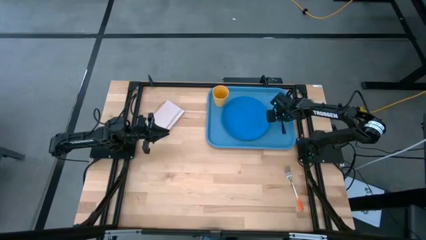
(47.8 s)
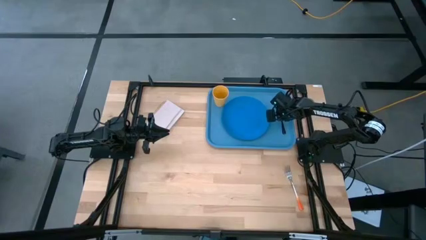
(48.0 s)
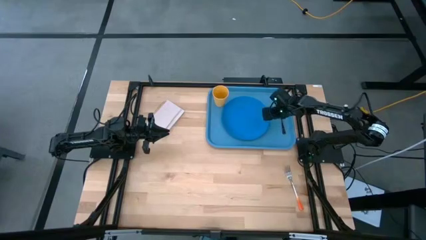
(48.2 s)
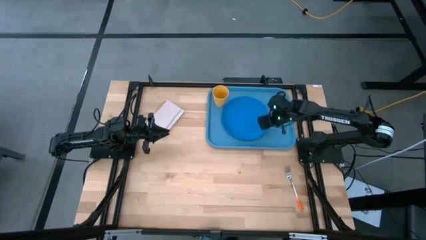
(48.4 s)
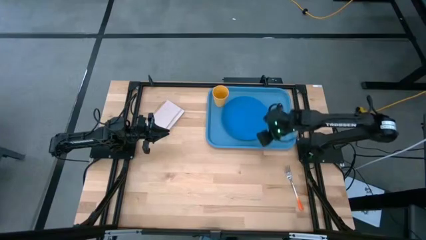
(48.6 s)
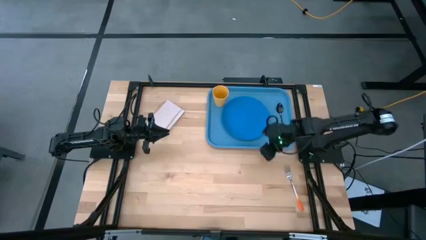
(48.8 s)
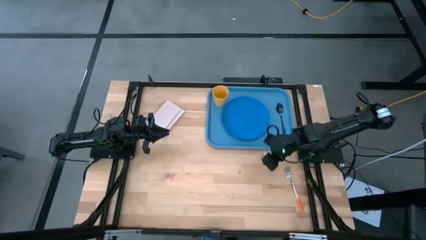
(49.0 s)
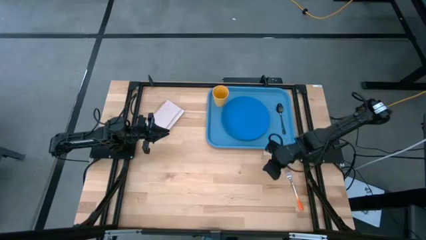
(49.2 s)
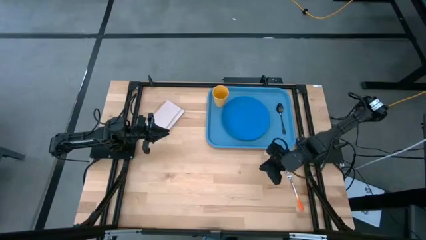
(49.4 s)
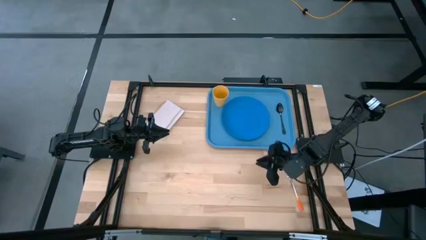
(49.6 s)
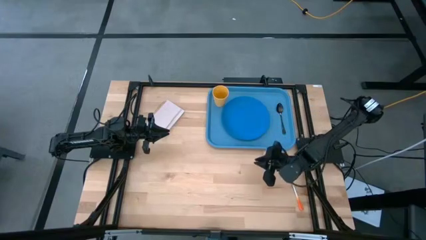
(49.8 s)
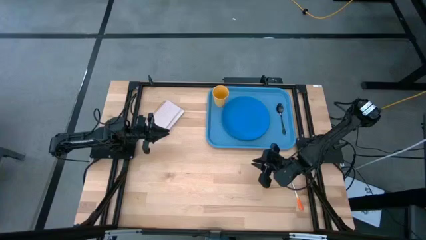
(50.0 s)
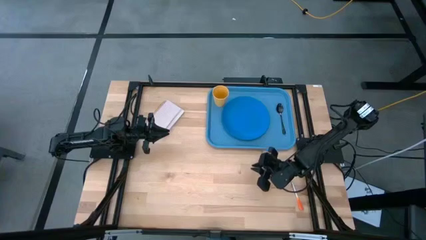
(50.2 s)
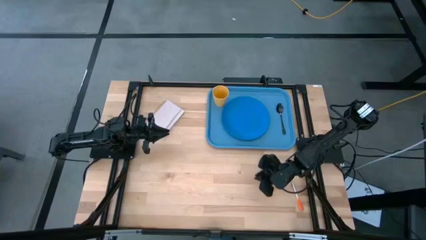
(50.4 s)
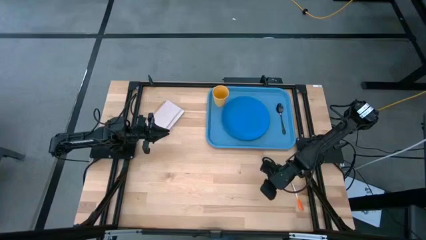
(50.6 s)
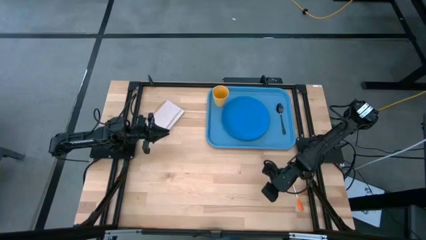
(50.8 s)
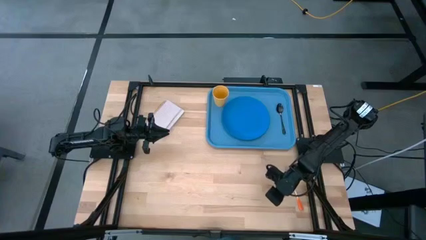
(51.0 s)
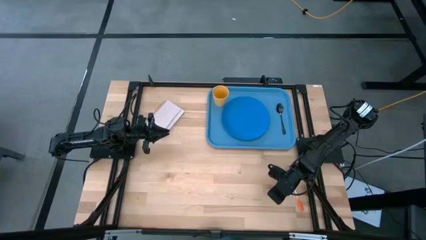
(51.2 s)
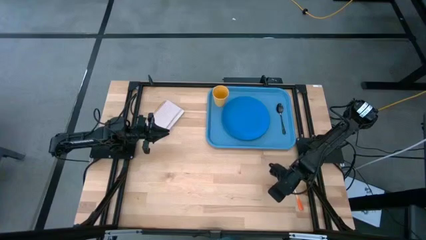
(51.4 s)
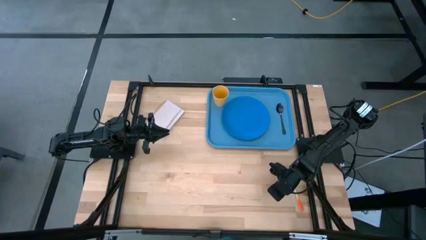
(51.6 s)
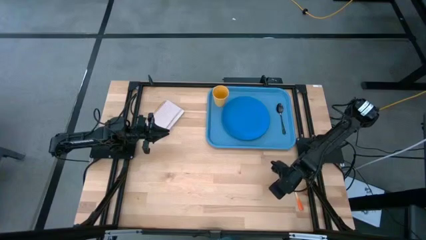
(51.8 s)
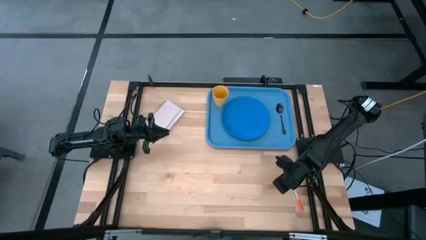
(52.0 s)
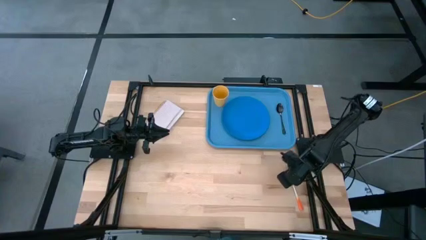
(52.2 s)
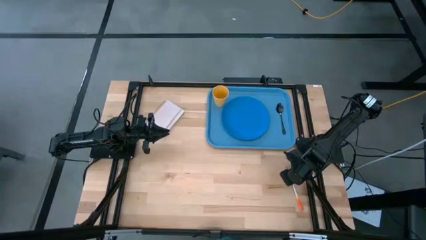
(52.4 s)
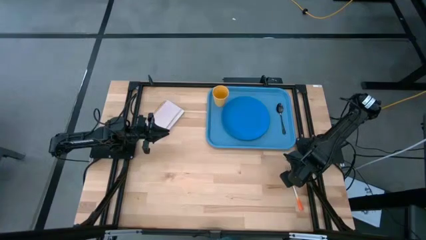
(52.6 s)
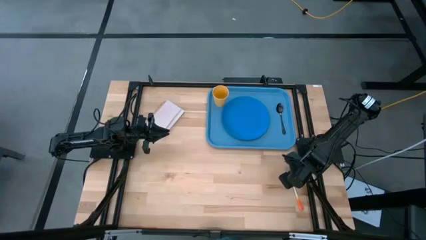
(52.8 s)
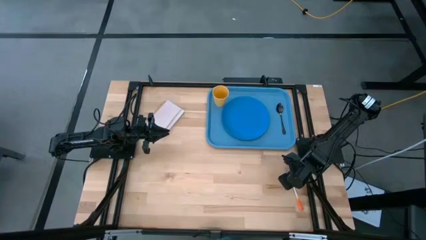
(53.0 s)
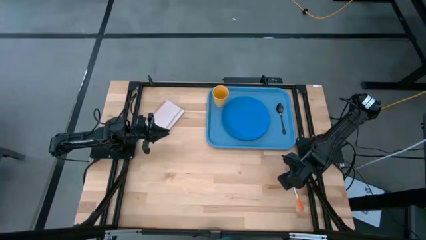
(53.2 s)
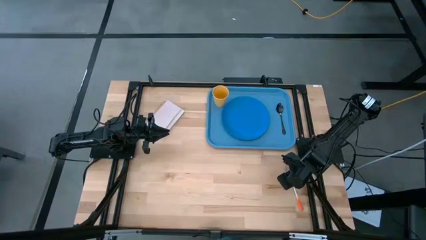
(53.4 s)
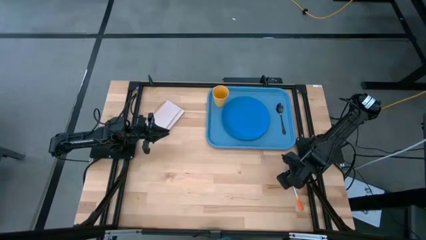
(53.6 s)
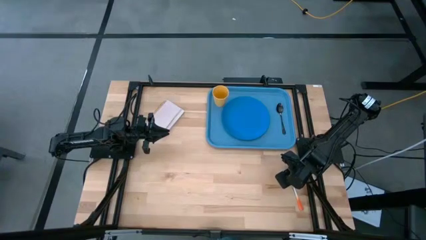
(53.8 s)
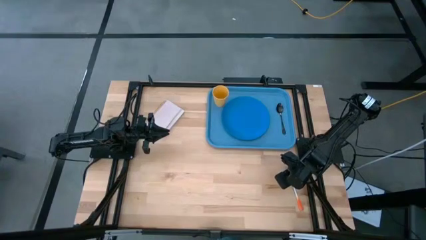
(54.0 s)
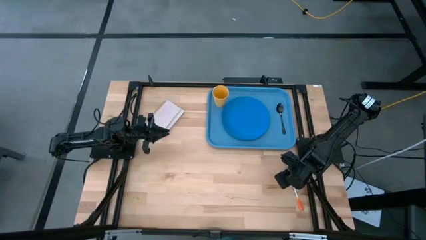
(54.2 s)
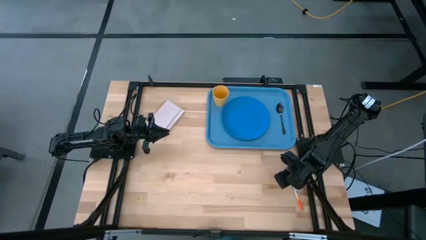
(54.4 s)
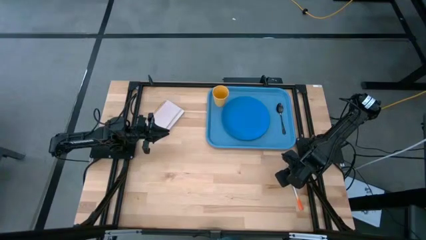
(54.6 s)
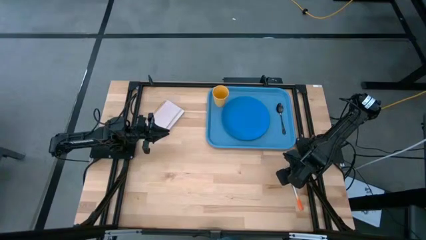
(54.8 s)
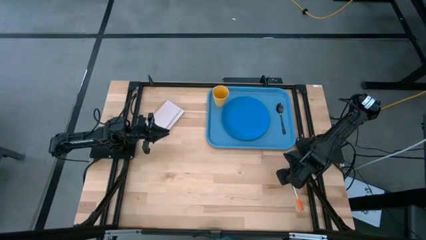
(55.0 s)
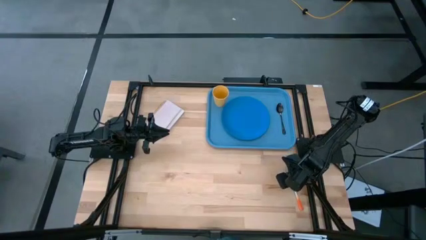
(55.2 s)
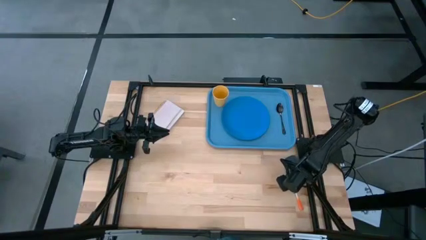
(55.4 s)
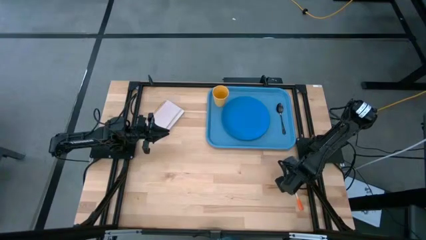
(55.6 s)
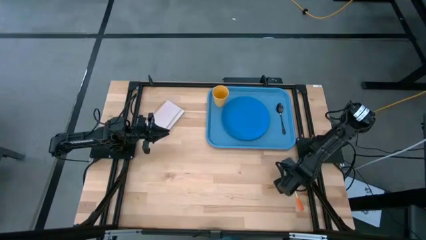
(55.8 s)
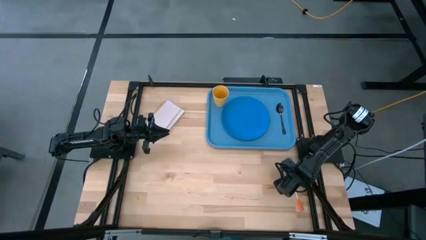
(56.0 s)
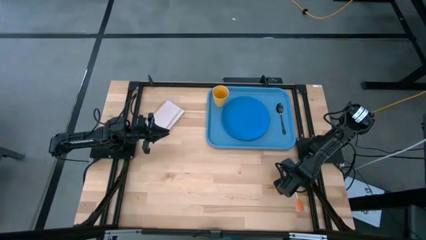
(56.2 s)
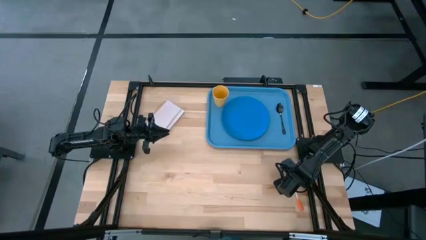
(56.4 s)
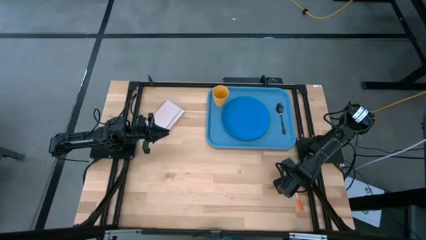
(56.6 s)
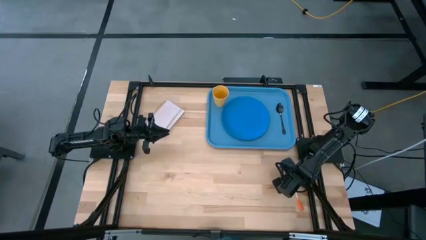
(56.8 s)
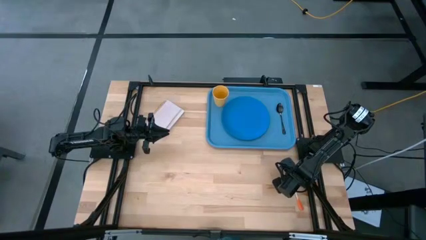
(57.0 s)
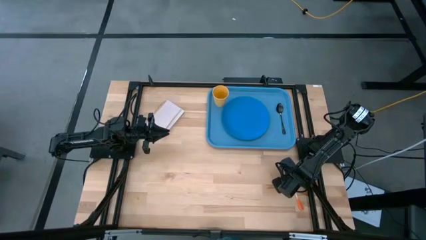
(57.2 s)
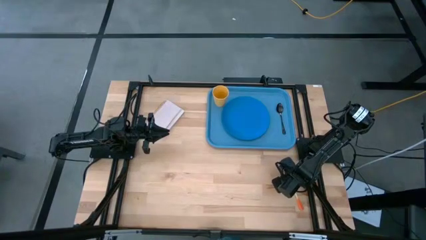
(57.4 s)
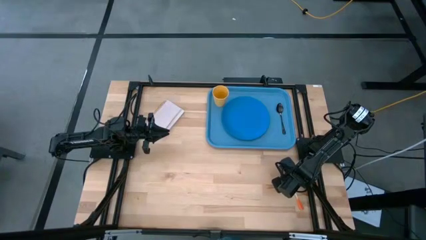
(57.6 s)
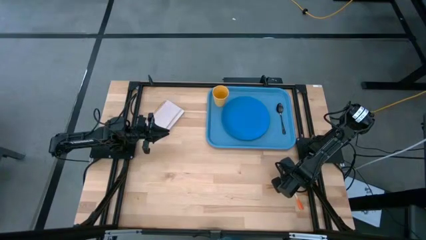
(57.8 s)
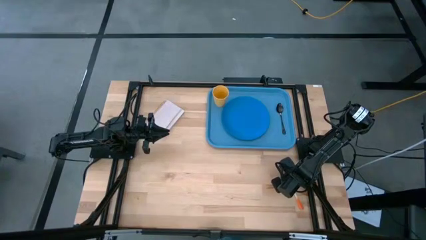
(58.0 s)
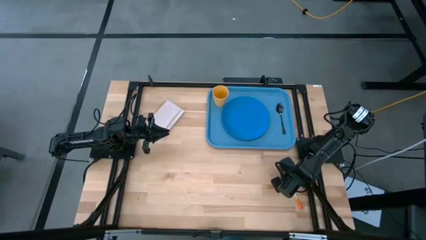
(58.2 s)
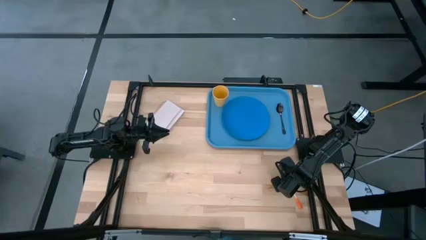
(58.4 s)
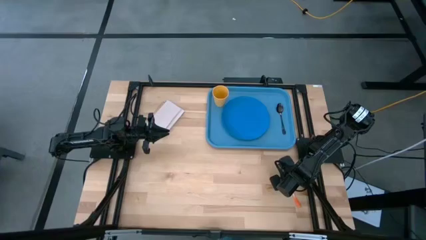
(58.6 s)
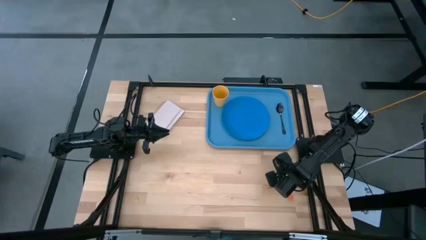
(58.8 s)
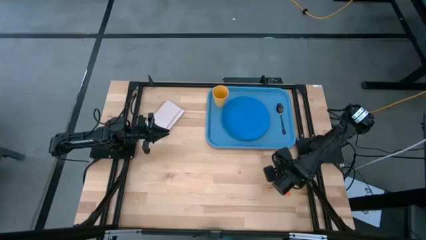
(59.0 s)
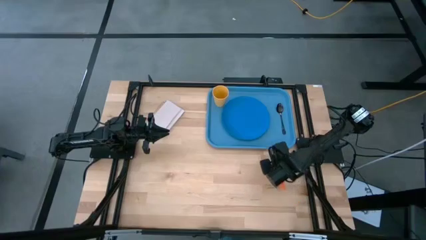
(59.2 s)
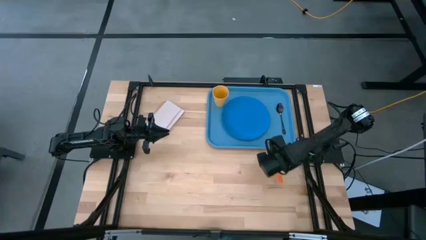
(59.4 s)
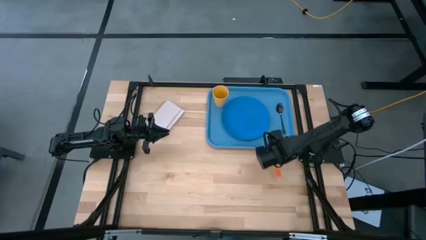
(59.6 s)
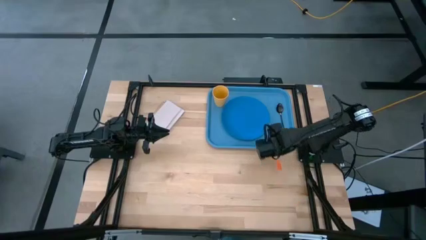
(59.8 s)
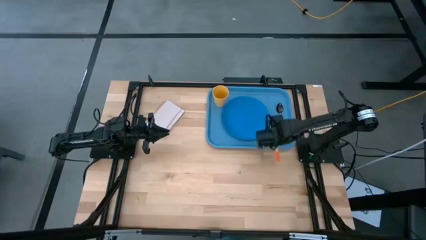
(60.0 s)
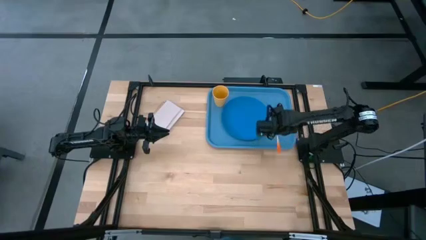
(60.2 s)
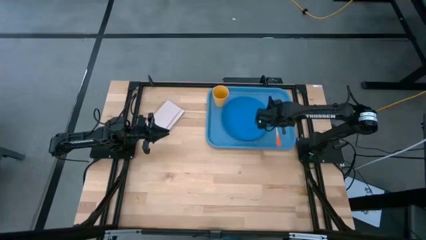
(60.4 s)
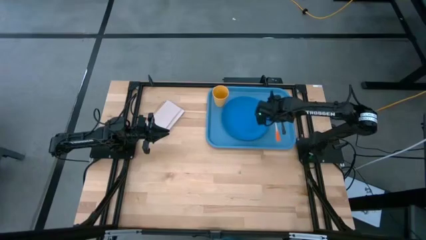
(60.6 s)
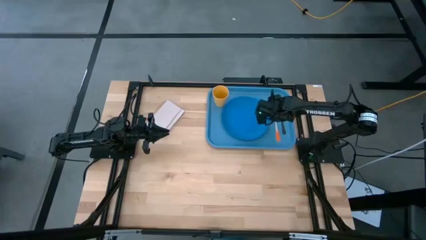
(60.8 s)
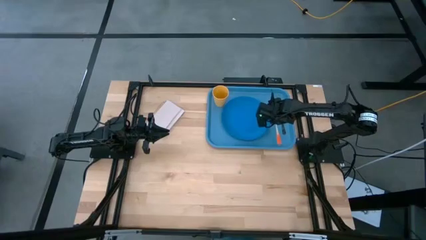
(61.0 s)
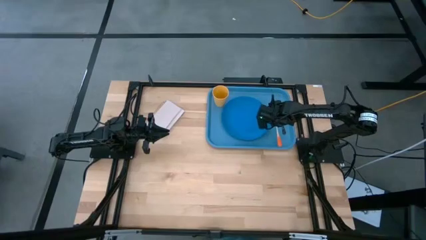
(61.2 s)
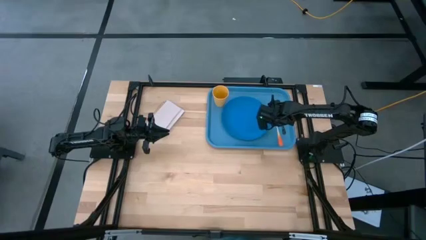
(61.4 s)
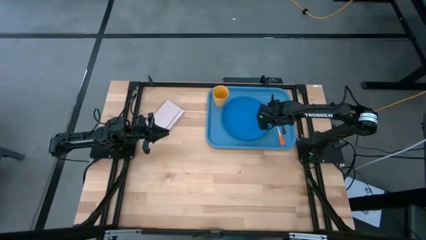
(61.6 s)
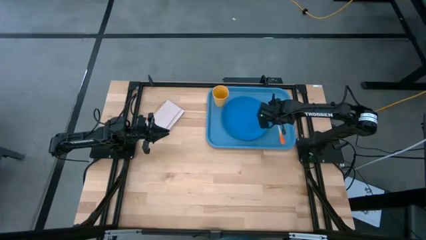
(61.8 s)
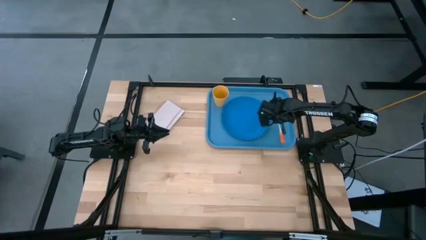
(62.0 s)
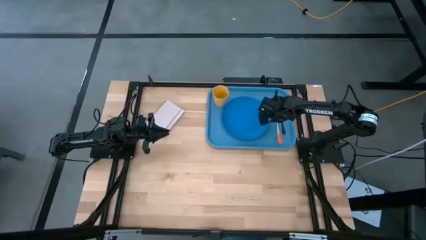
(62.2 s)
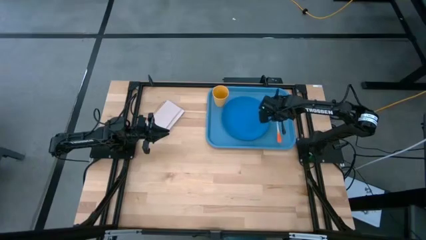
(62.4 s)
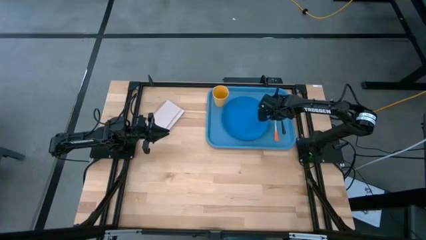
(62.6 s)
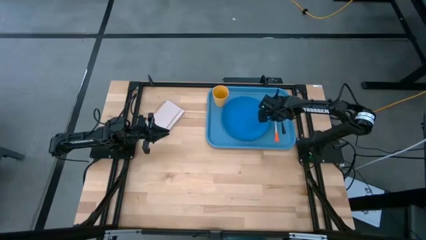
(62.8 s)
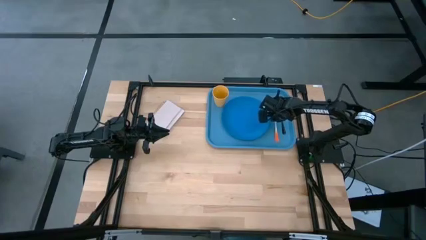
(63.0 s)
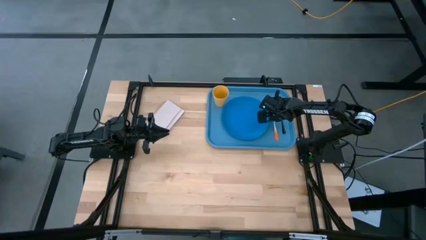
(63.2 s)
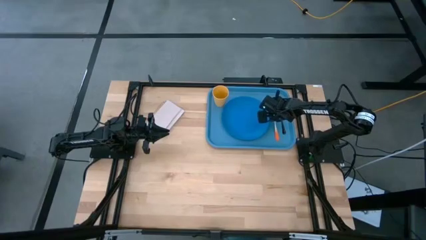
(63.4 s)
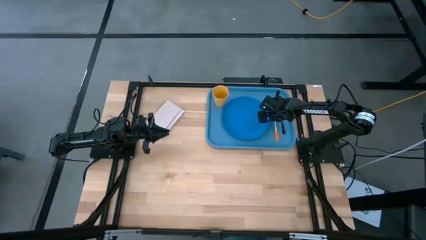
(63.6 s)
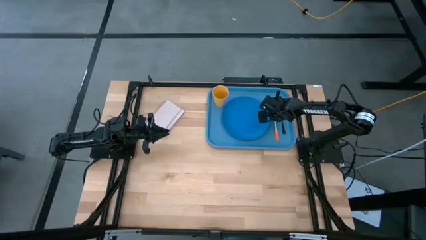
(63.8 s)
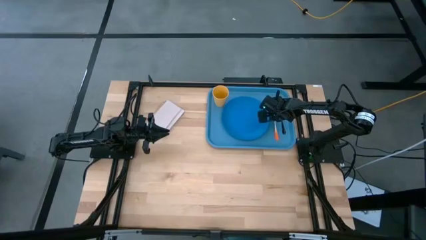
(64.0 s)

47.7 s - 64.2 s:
Task: Pick and place plate/cup/fork/spoon on tray
Put the orange fork on the tray in between the blue plate and black spoon
